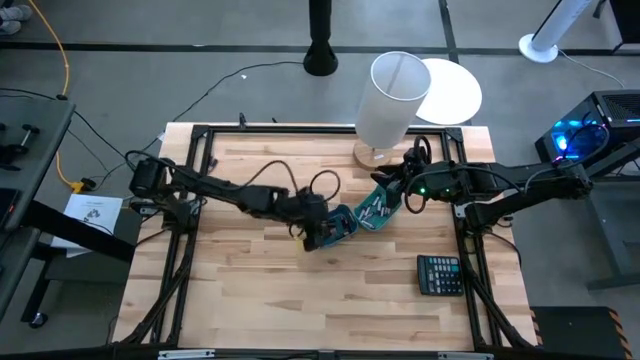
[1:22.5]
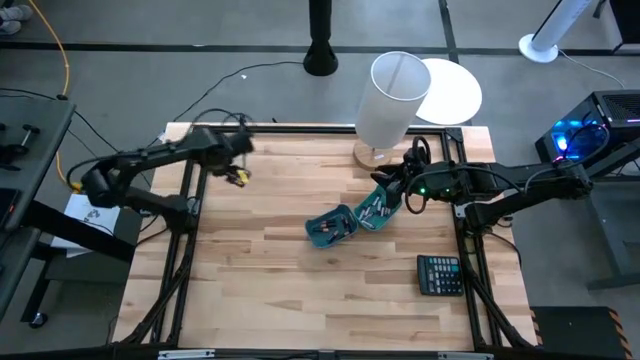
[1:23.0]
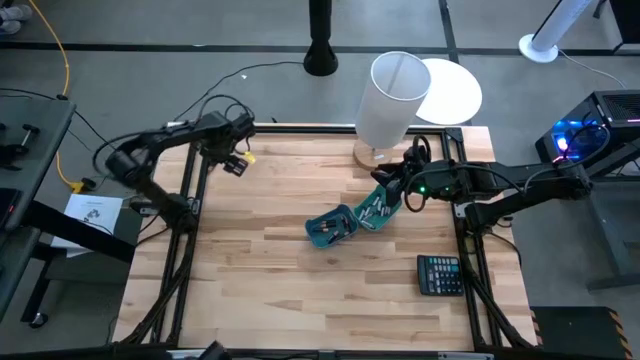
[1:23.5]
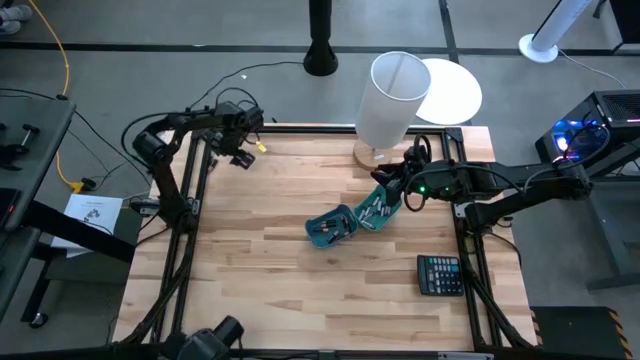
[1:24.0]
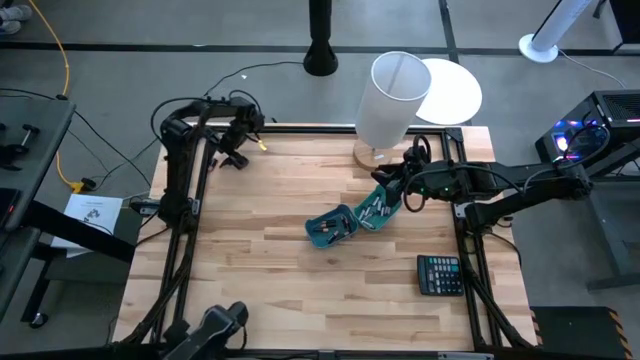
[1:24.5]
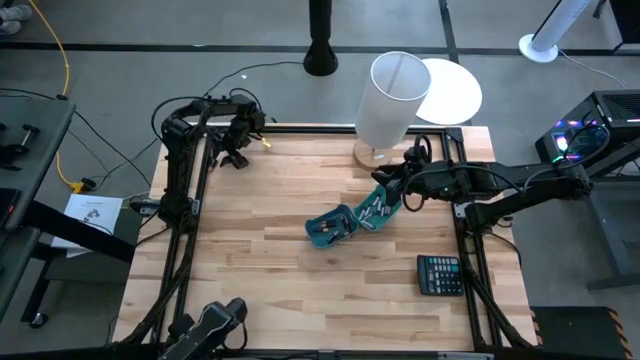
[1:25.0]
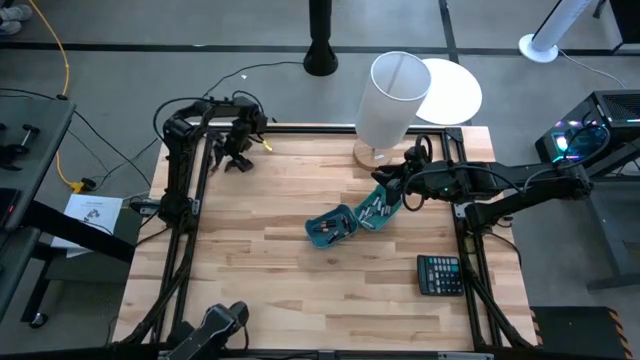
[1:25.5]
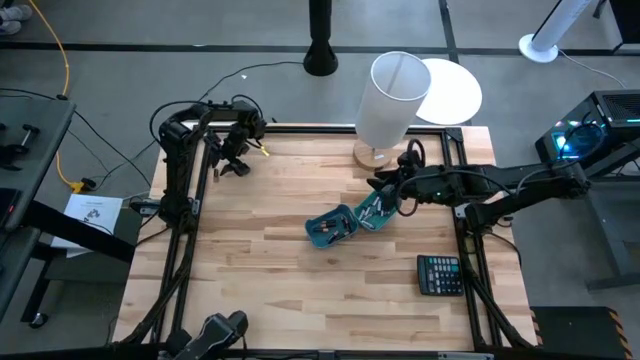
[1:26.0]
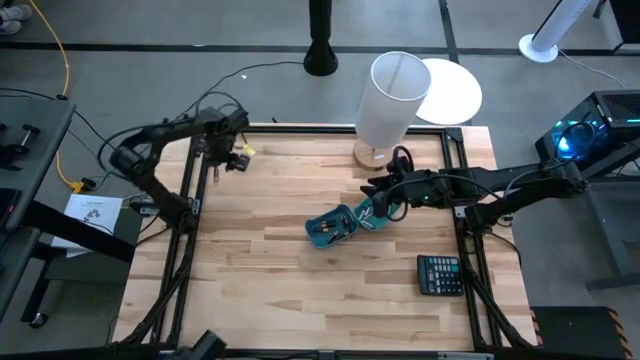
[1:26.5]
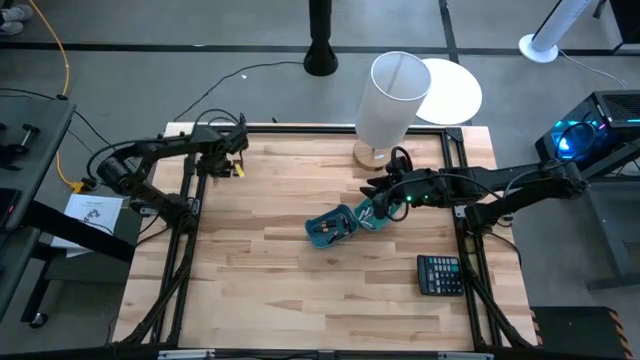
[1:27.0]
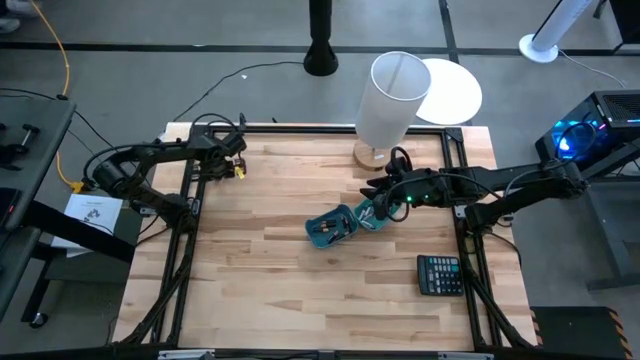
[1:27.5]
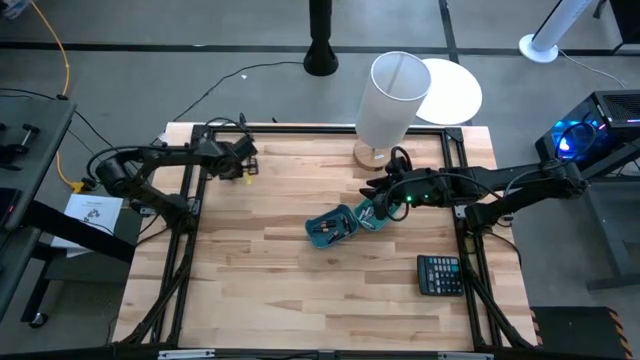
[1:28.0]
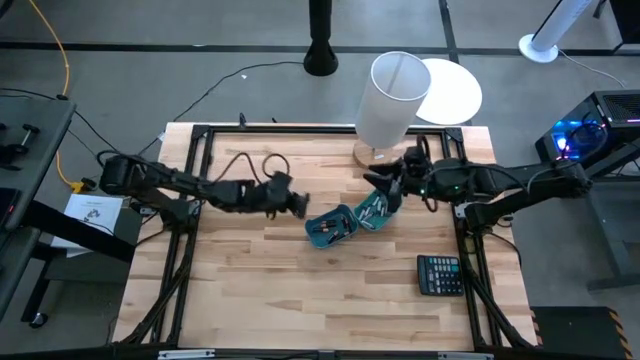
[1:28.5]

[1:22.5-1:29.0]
Task: Sort batteries
Put the black battery into the blue bin

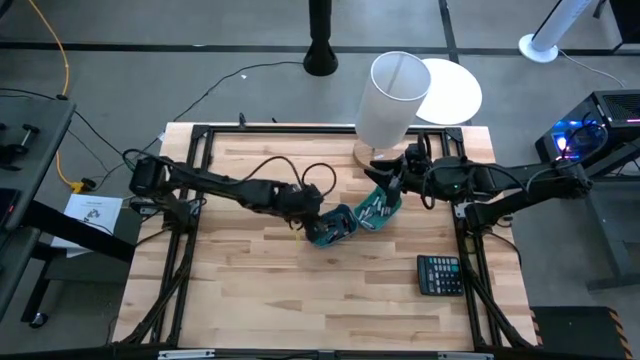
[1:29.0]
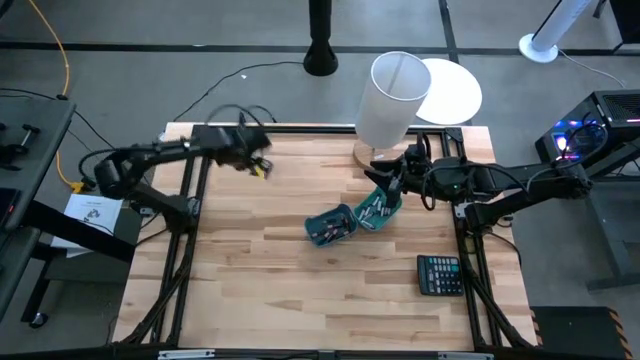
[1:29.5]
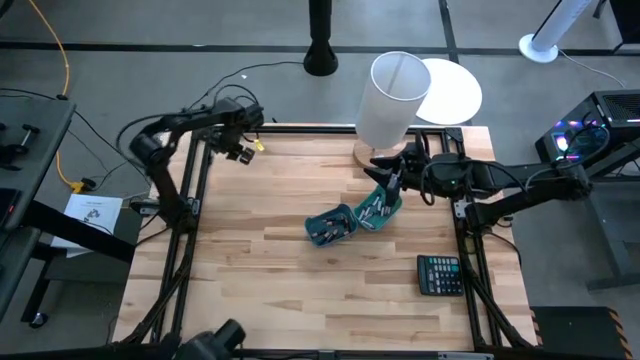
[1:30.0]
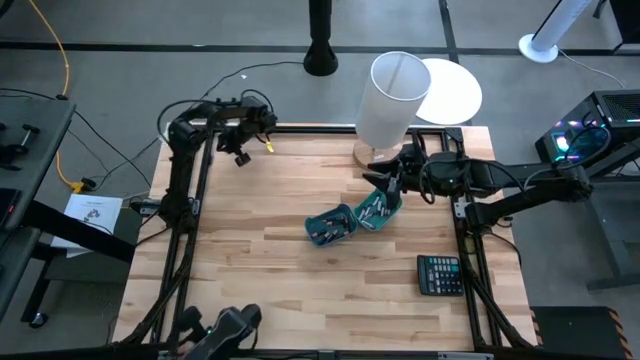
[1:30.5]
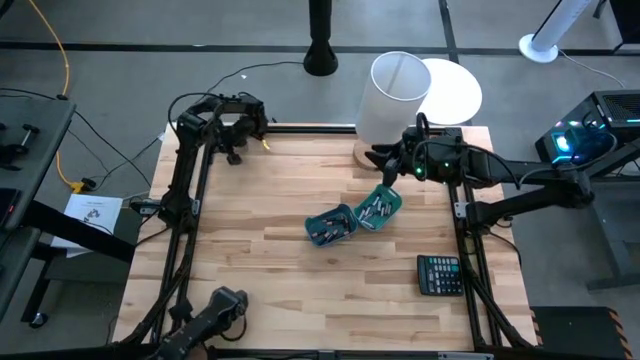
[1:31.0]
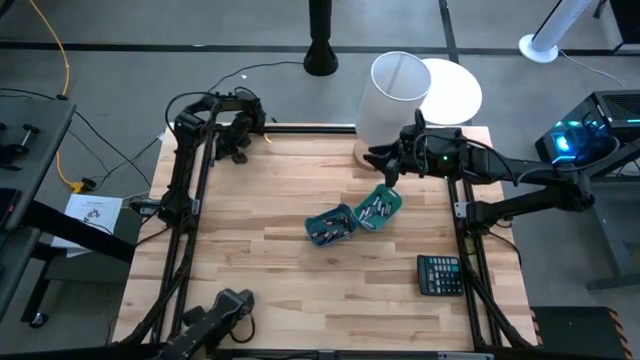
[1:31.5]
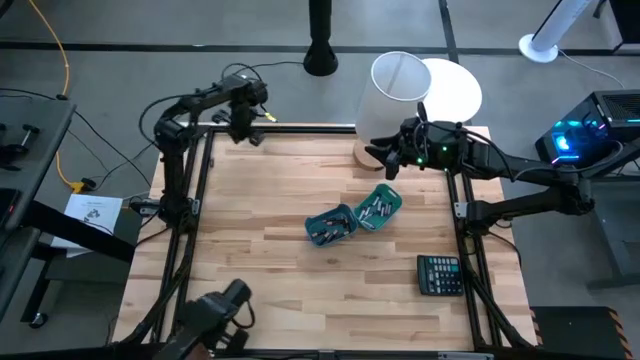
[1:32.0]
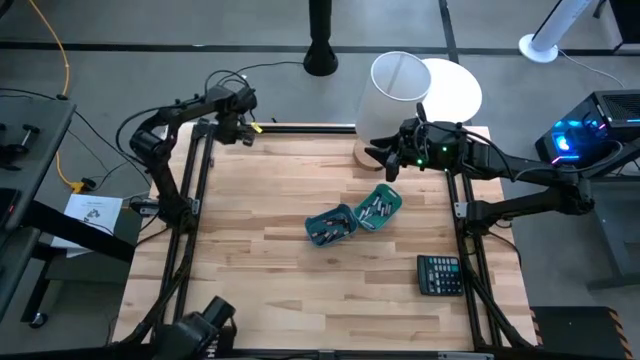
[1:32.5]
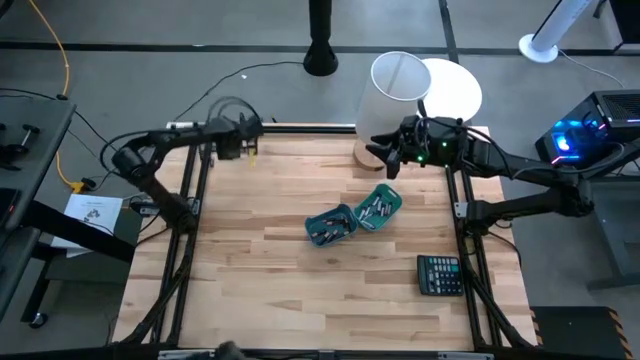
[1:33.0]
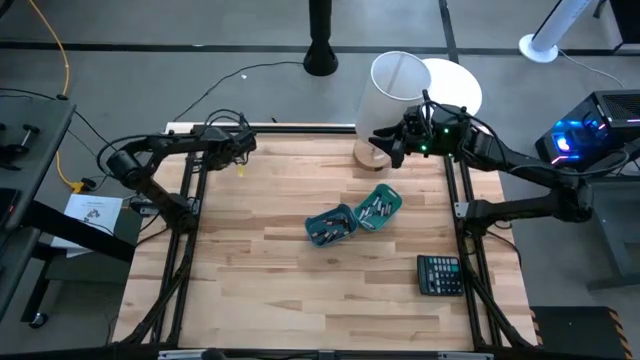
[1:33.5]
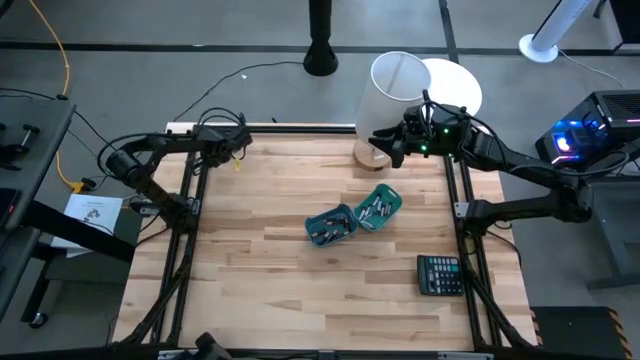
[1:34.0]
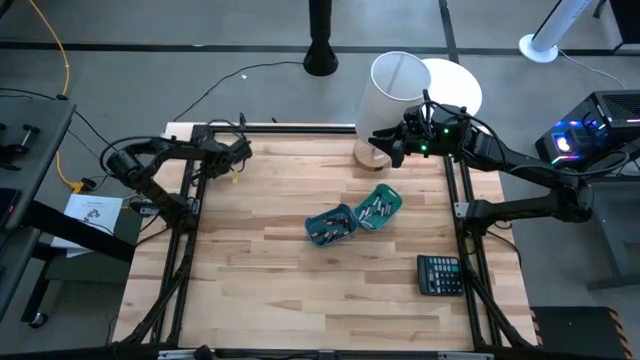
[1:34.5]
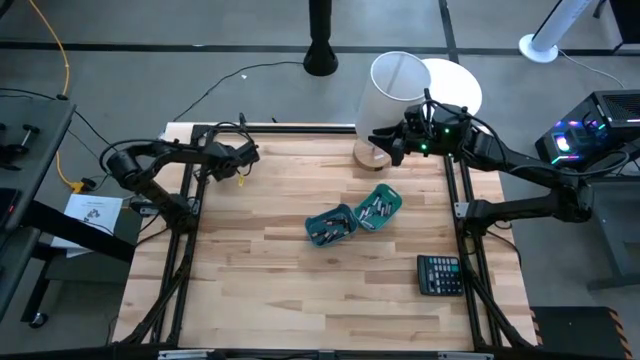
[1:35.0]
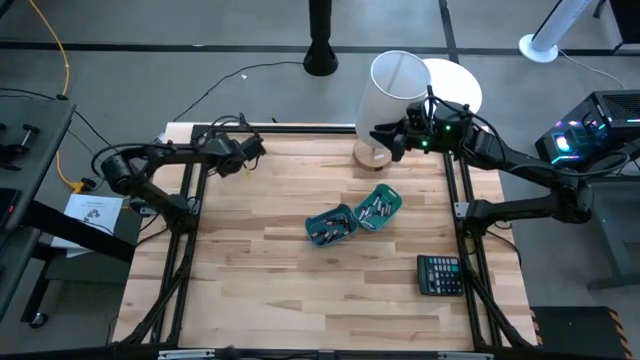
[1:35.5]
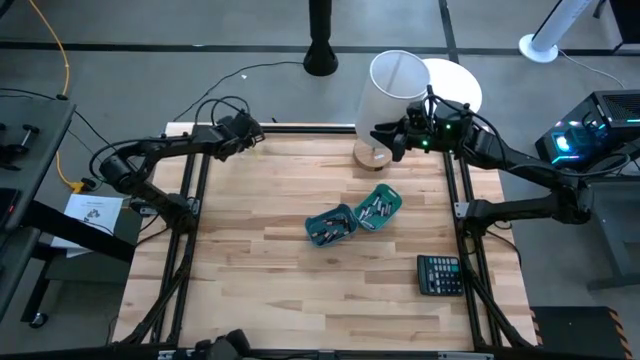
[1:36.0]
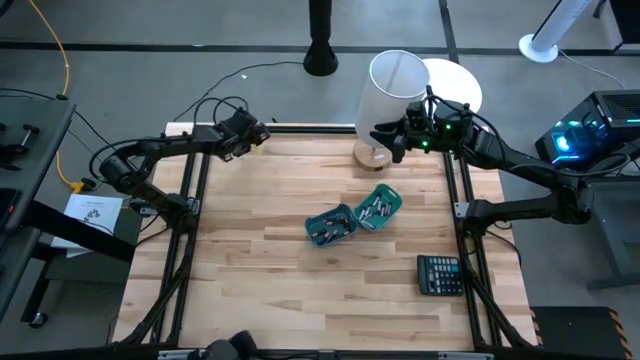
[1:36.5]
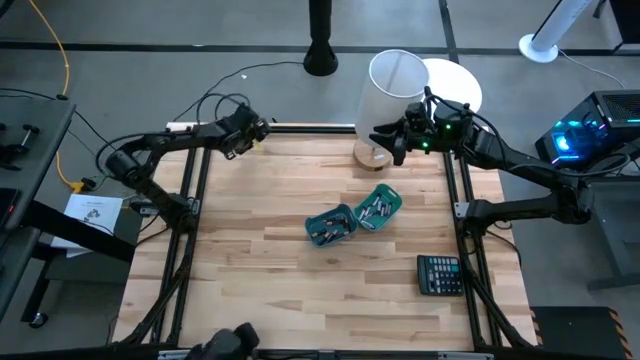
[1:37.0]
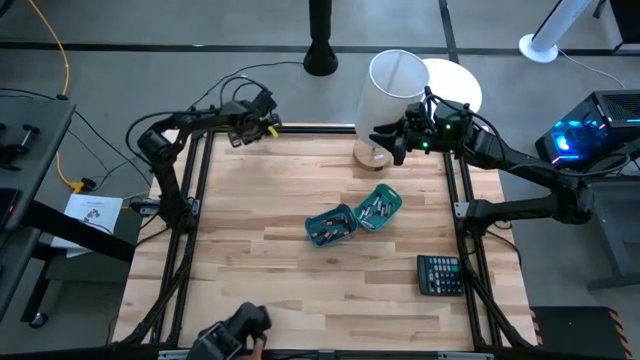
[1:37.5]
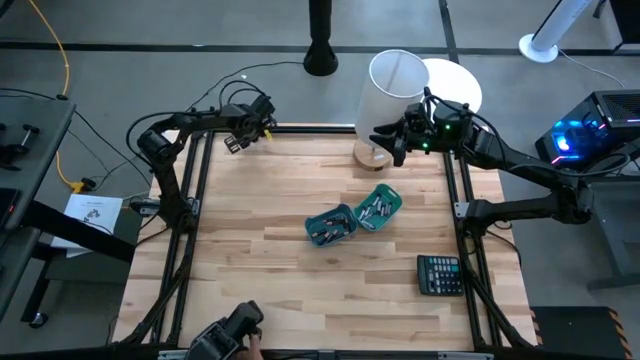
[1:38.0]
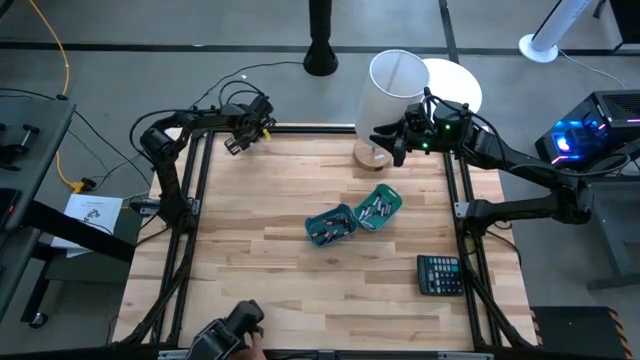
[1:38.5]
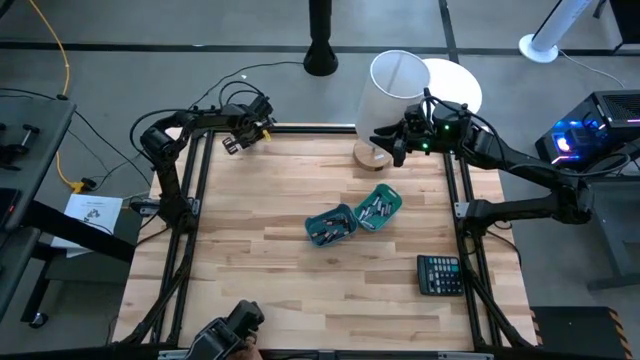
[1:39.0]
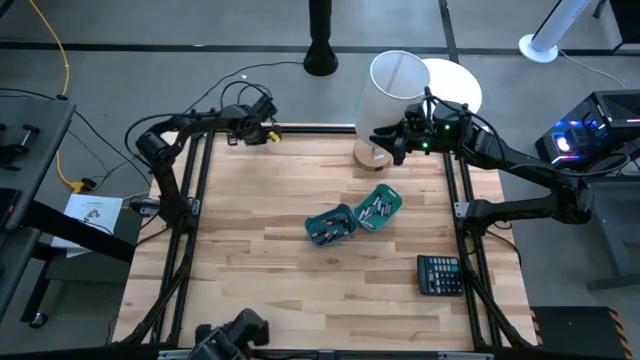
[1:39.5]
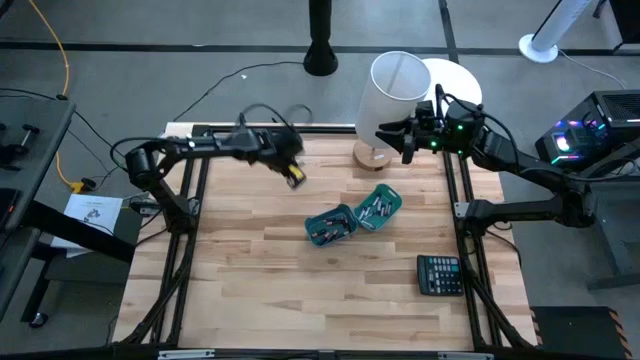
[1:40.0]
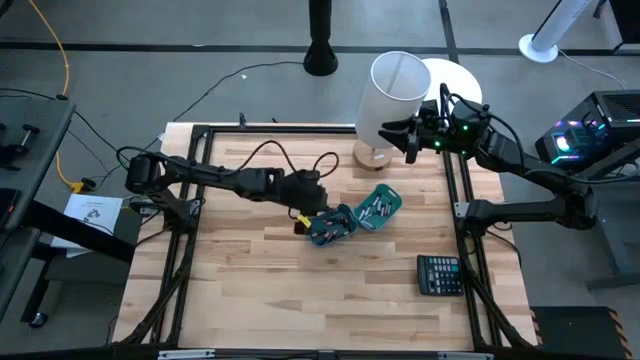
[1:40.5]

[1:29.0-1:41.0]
Put the black battery into the blue bin

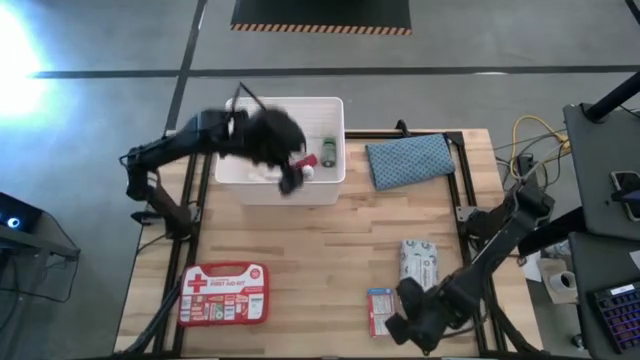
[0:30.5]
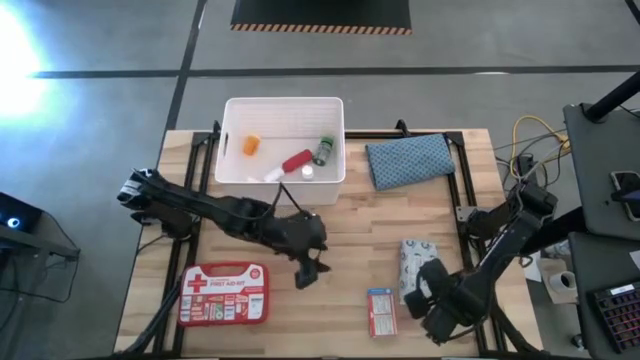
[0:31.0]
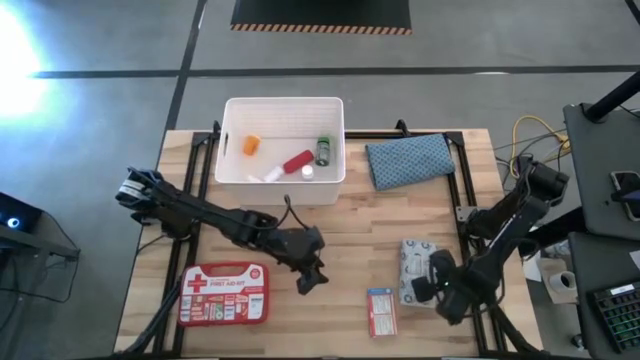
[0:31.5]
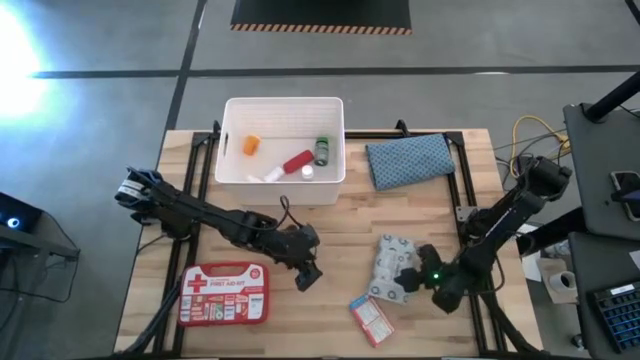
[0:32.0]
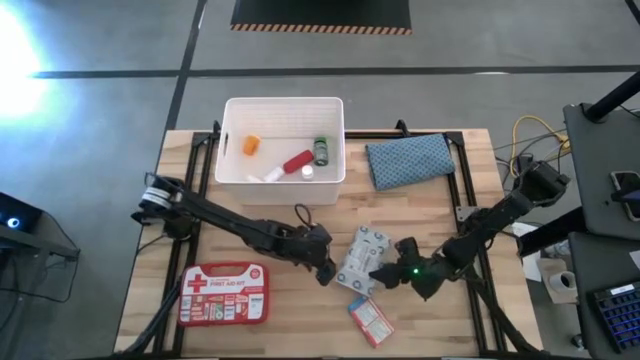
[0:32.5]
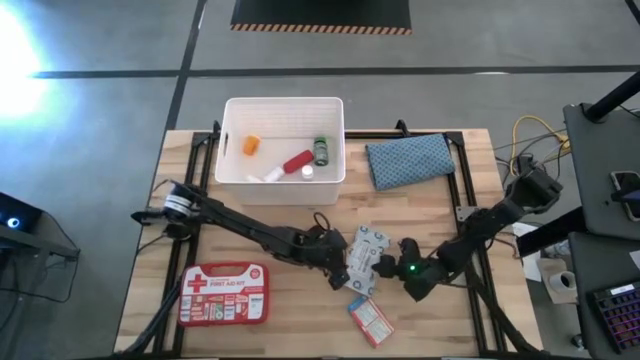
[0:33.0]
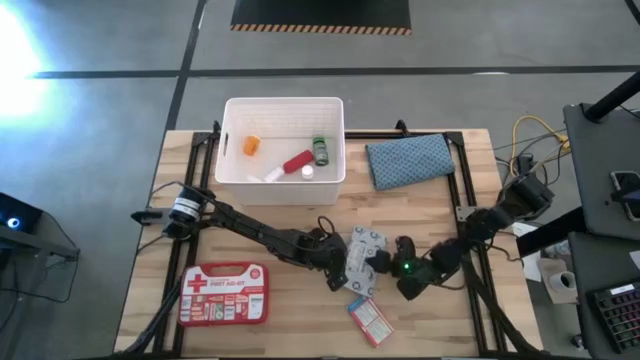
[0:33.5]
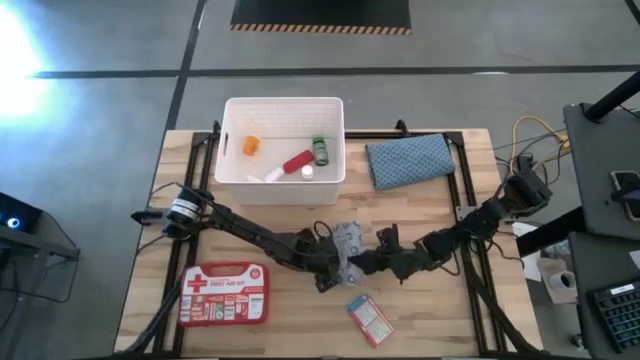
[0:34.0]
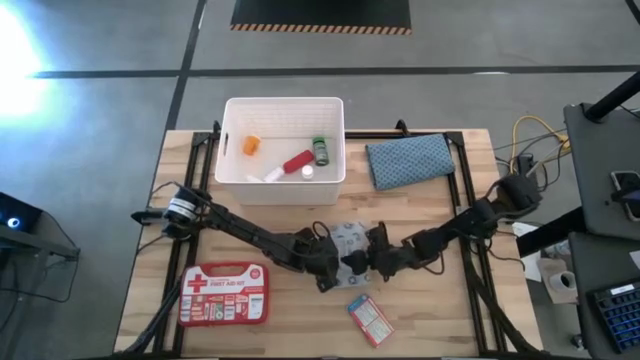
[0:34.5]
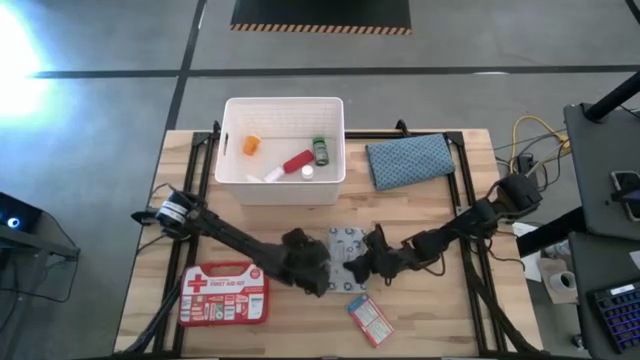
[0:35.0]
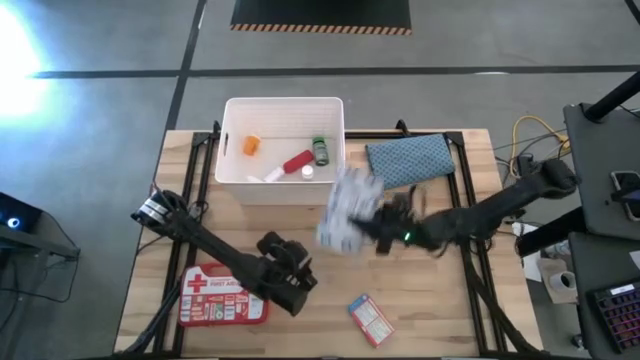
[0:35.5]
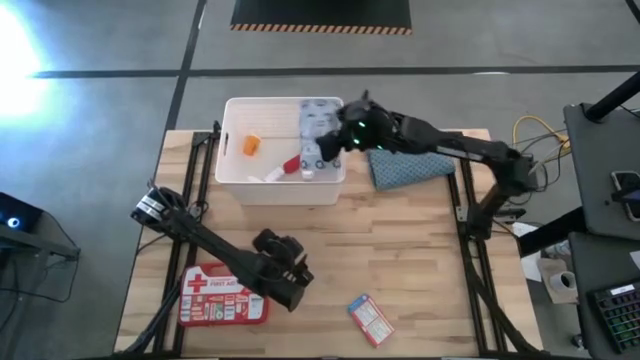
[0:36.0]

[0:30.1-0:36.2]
Task: Pick & place medical supplies in basket/bin
Put the white bag into the white bin
